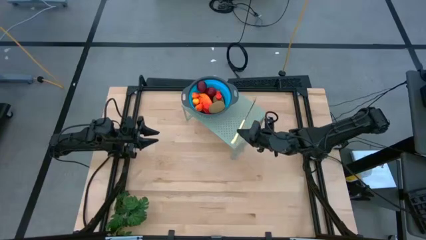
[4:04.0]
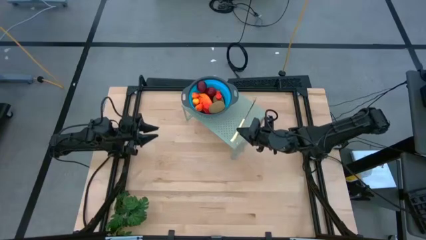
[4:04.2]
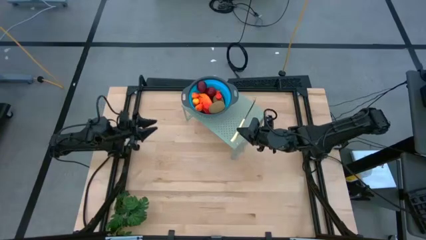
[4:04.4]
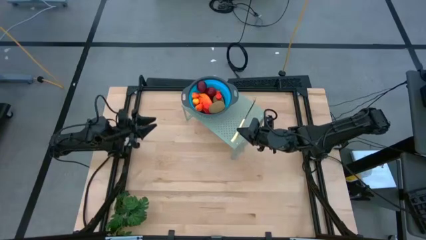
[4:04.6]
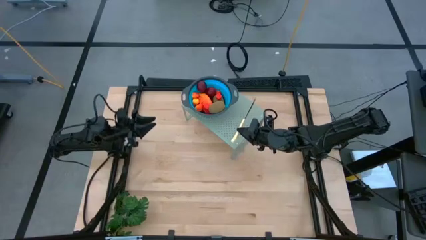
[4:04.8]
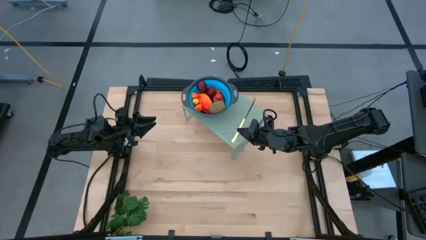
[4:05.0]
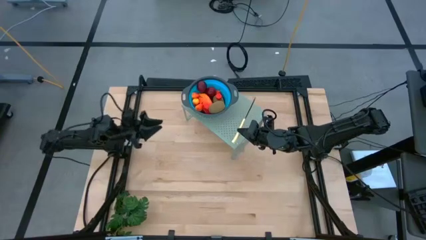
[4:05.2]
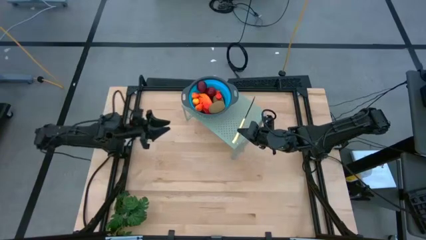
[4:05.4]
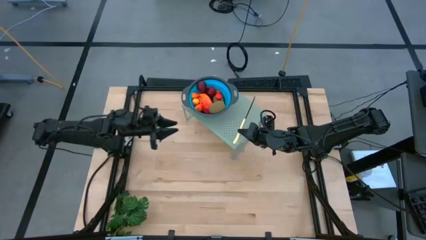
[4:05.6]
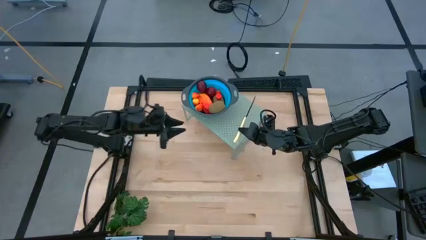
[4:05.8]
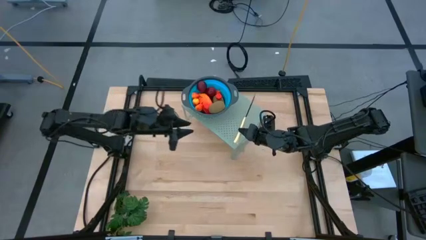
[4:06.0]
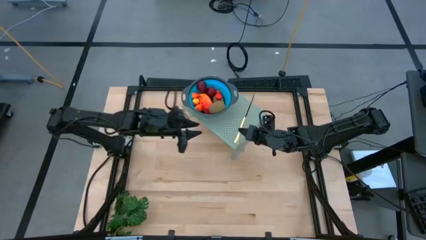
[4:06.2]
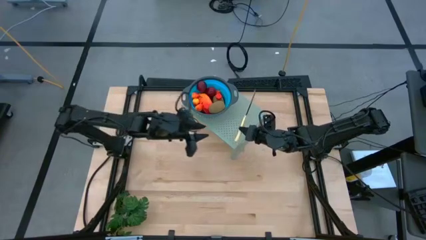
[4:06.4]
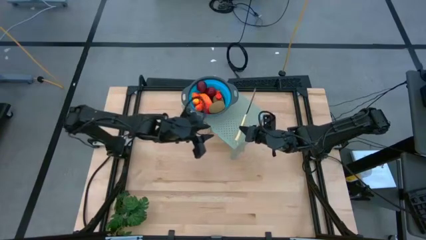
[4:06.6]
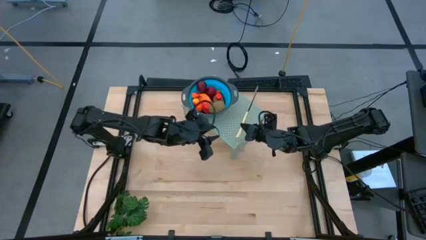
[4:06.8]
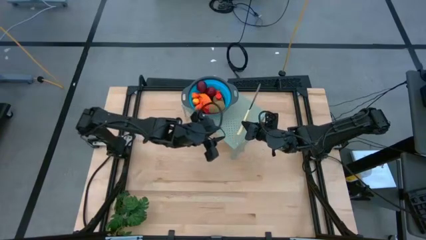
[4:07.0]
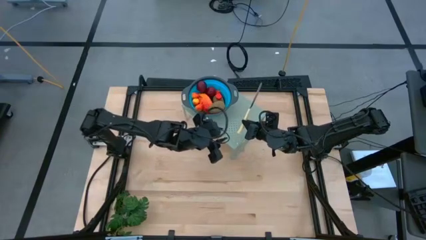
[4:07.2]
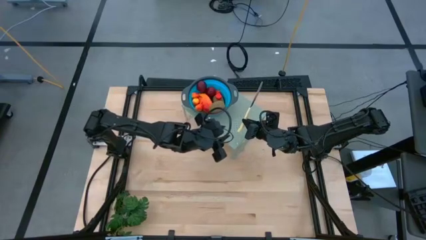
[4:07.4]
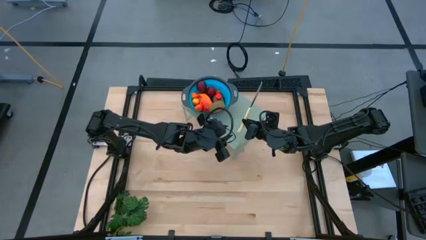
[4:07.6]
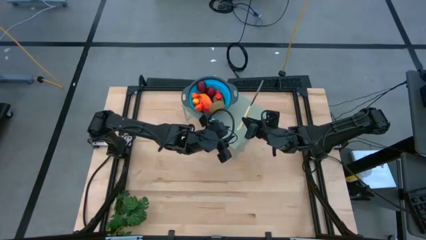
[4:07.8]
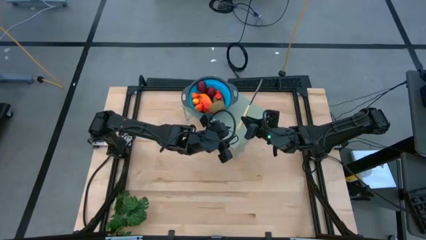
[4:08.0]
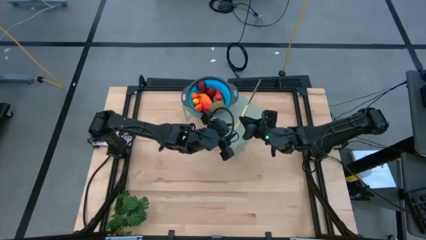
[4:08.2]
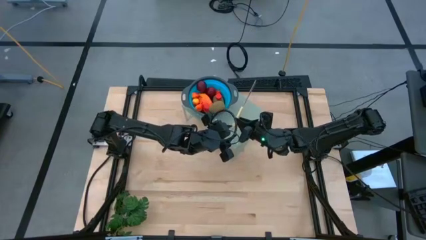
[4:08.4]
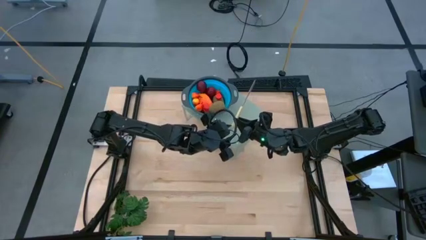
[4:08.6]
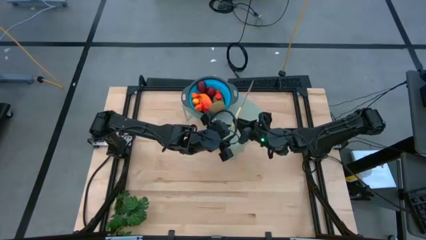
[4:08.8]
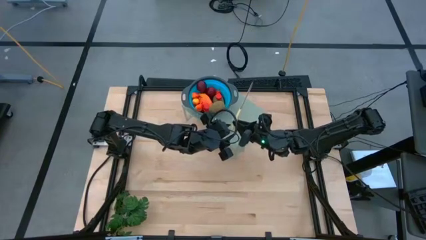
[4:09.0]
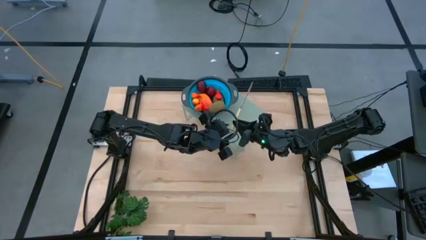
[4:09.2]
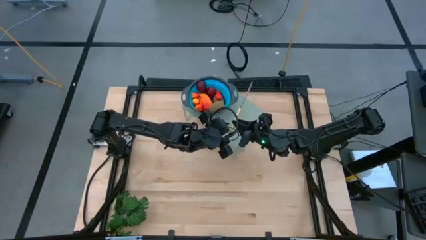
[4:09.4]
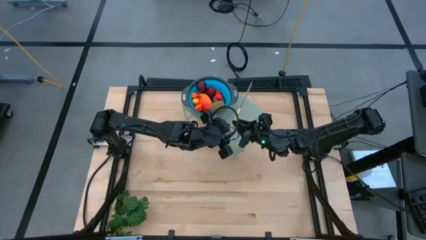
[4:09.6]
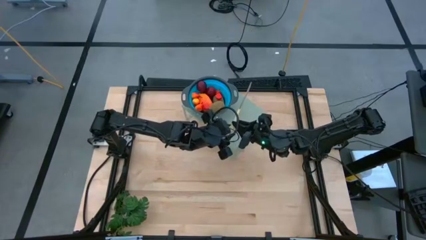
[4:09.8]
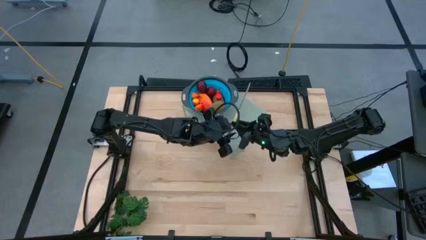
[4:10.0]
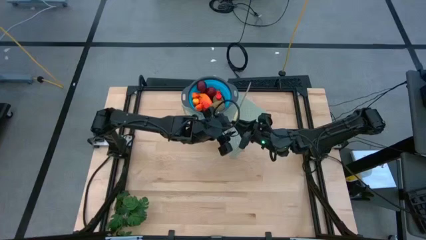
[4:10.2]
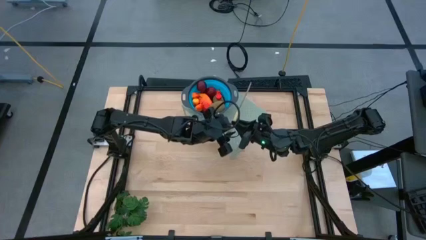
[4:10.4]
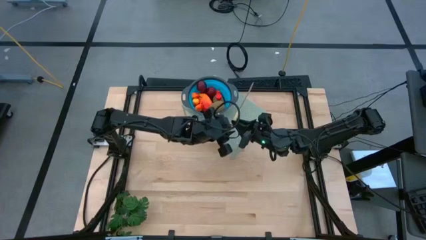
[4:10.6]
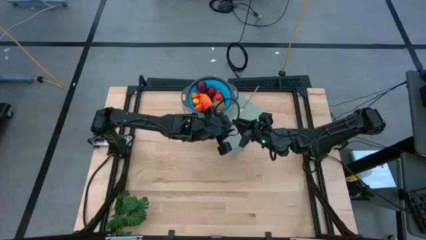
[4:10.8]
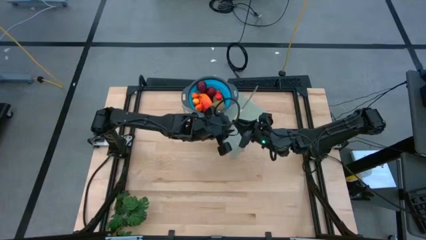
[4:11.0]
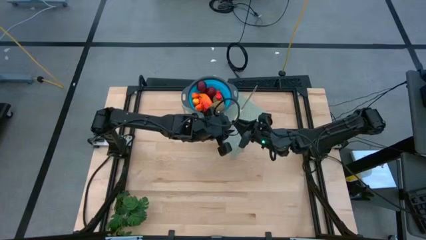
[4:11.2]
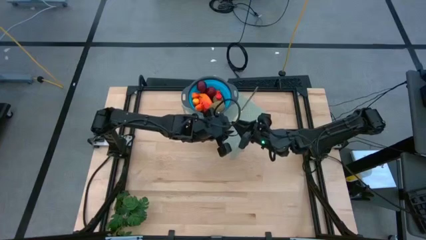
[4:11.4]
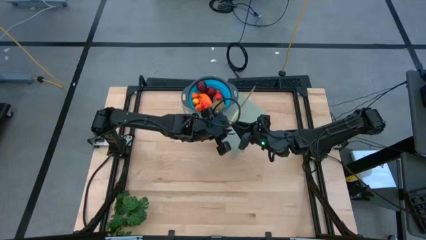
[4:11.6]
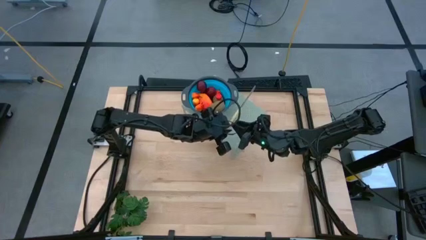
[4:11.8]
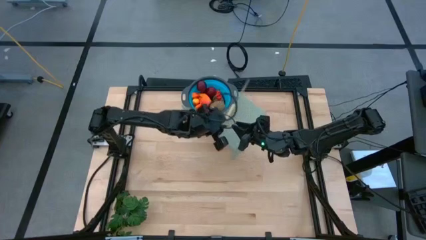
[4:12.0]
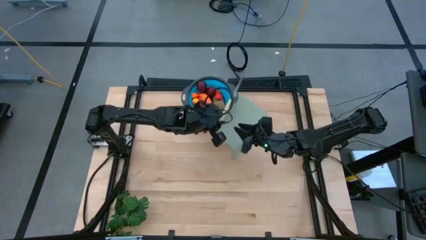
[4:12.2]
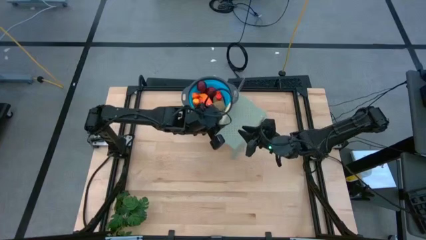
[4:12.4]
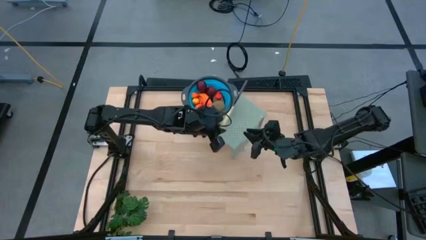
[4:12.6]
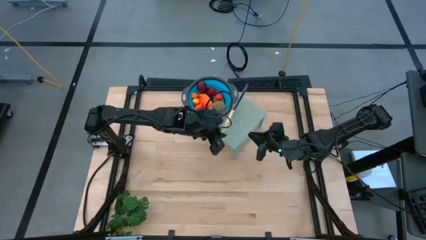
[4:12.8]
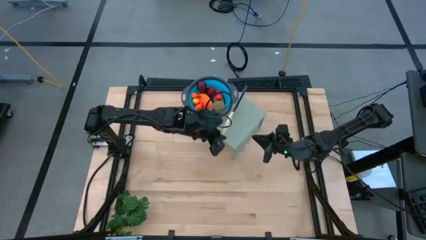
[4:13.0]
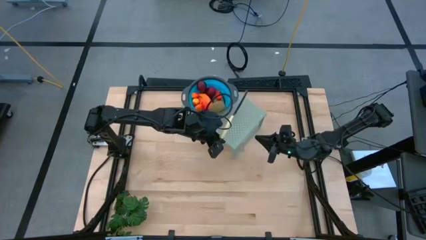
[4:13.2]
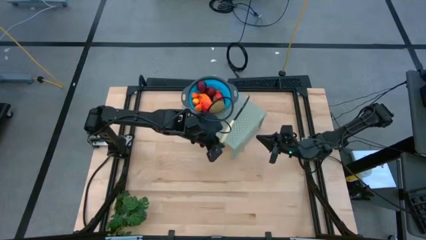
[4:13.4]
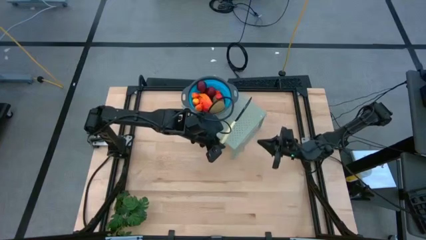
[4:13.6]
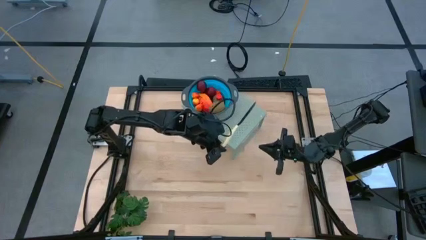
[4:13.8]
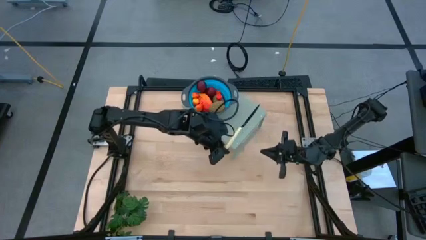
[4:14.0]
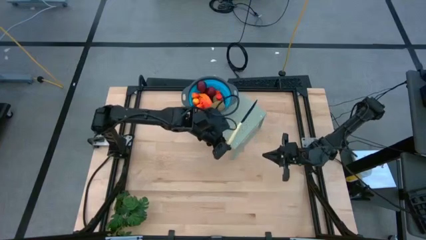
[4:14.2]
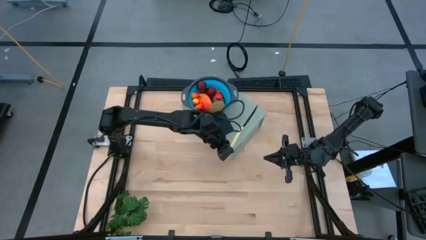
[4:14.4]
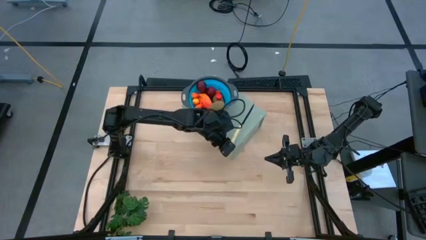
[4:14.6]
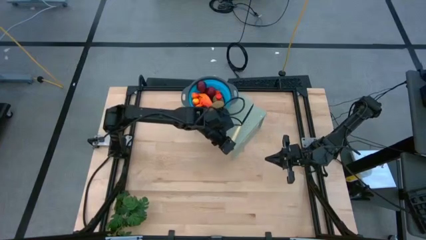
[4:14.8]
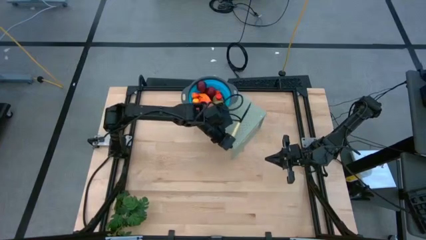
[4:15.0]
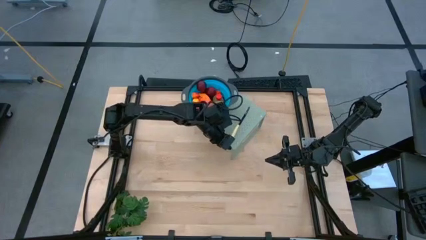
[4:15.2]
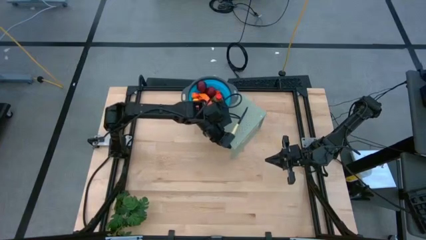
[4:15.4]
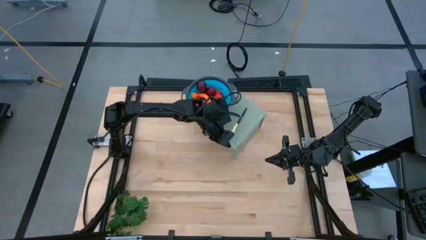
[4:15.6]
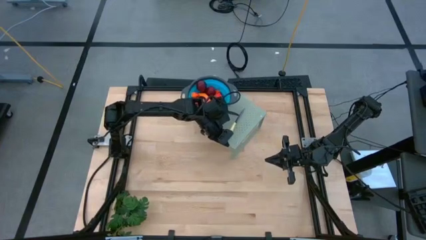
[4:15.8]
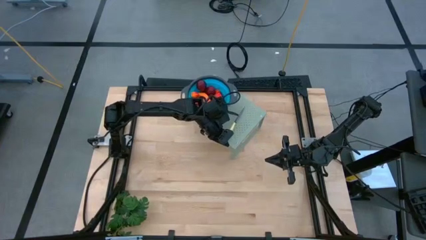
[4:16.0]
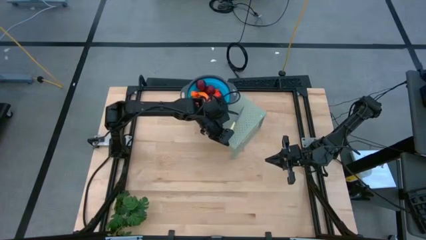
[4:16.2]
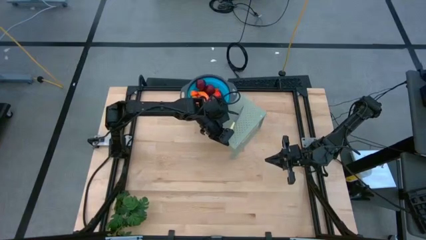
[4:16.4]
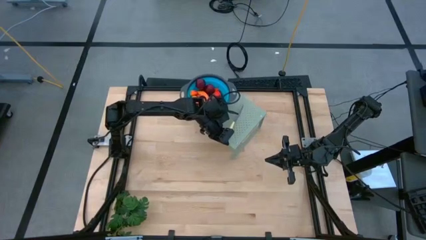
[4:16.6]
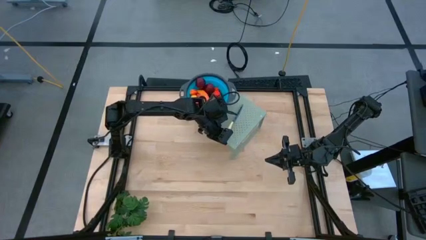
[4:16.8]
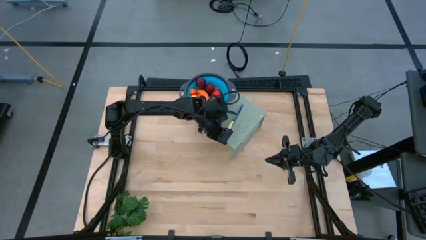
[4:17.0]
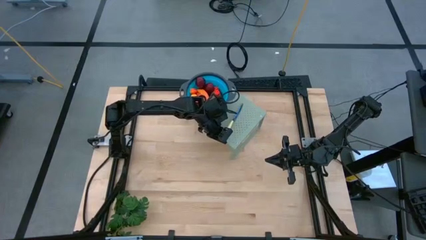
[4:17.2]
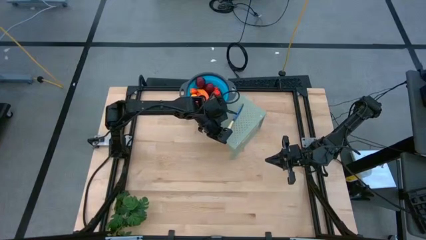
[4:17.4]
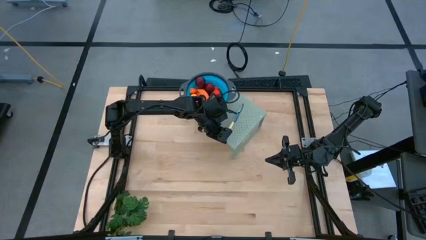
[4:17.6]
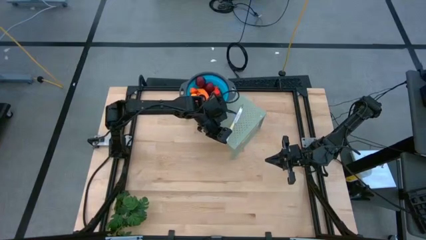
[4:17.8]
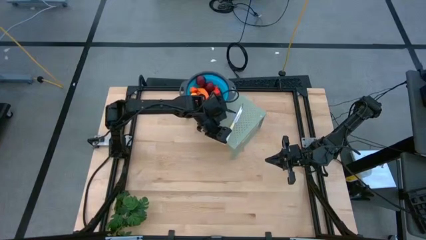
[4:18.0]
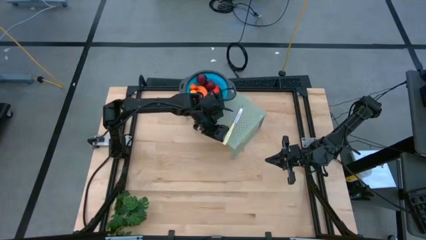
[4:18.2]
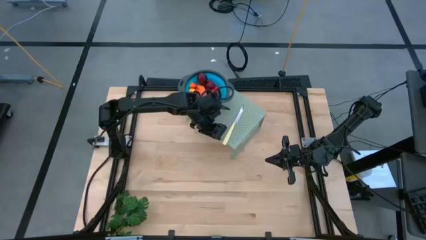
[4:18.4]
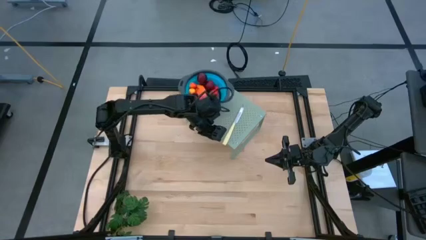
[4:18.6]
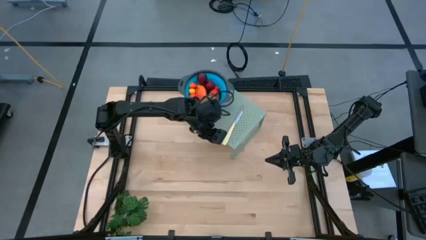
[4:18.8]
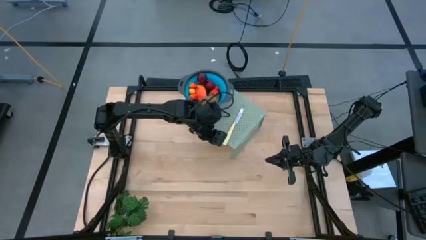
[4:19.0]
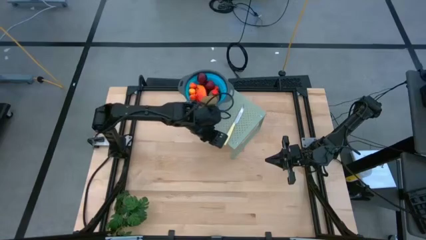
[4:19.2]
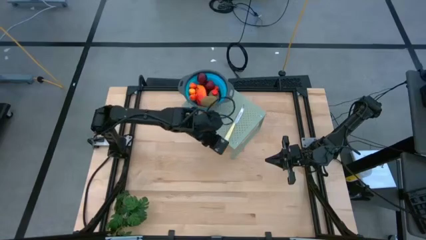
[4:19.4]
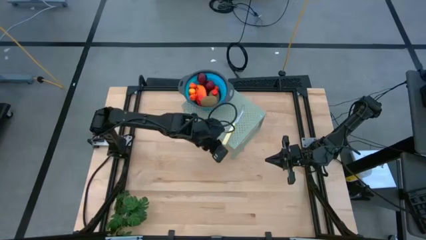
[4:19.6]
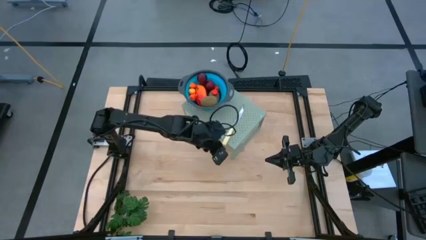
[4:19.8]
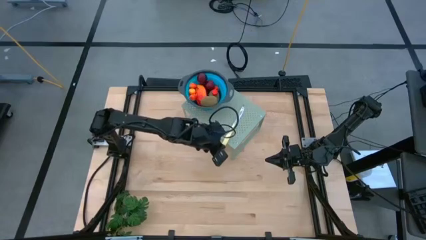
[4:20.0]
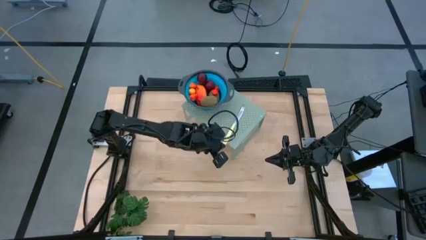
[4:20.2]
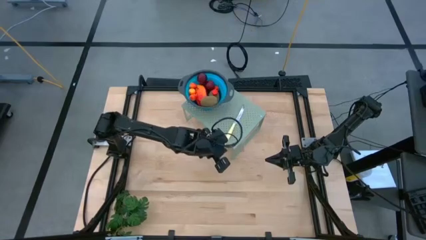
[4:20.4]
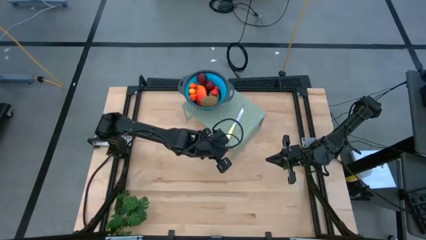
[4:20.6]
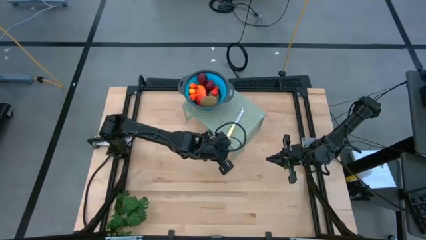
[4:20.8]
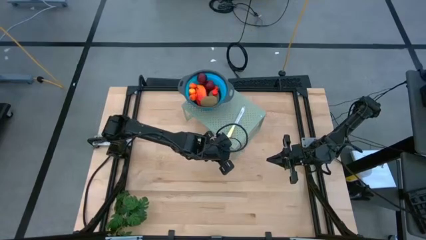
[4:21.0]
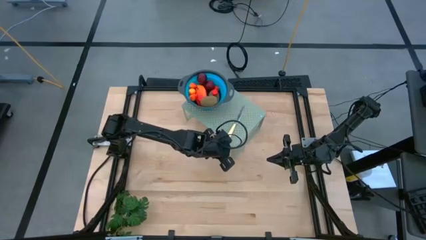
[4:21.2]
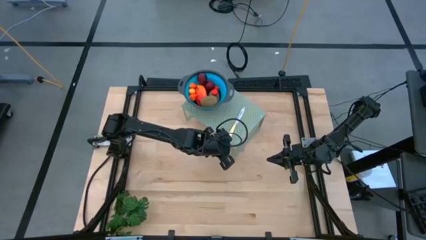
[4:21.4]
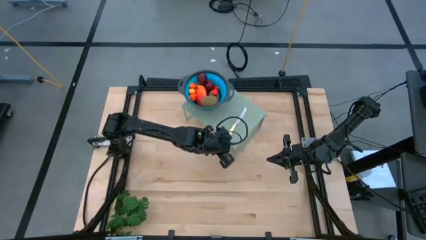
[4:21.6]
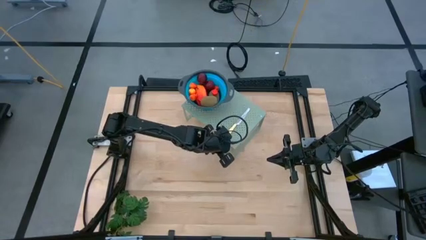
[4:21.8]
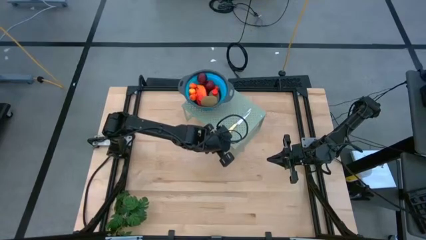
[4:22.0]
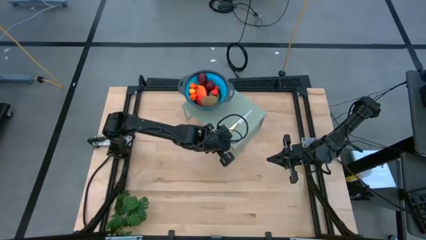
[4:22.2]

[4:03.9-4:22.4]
Task: Pick & Place Fruit
Put the knife on the shelf
